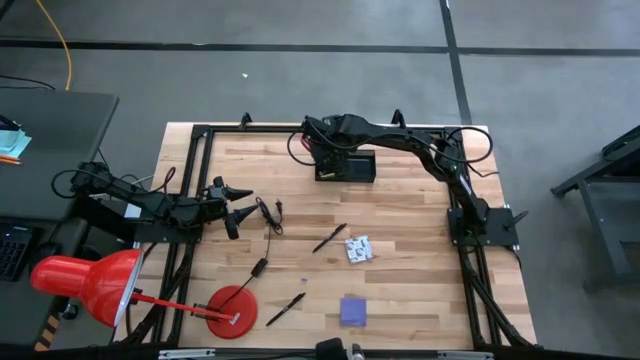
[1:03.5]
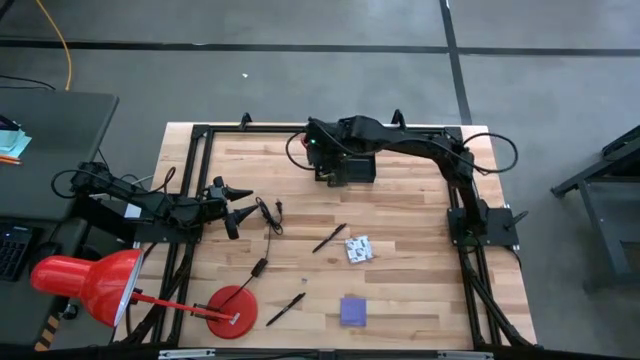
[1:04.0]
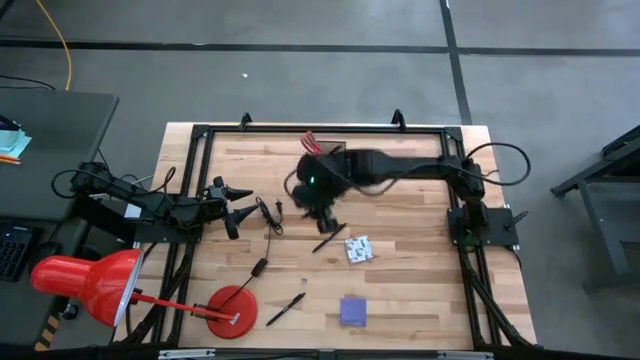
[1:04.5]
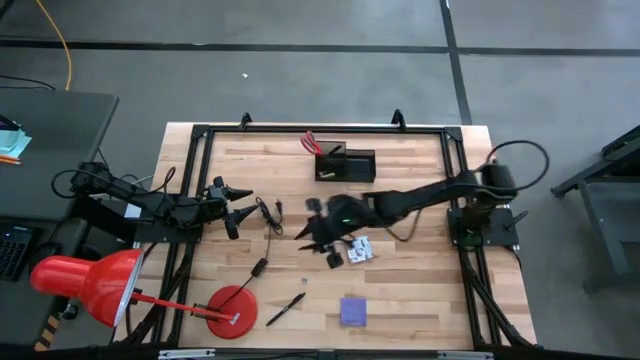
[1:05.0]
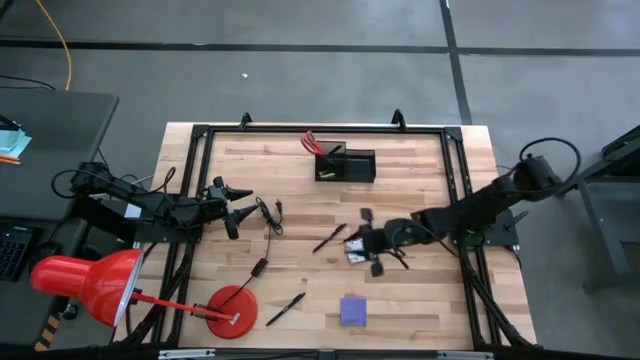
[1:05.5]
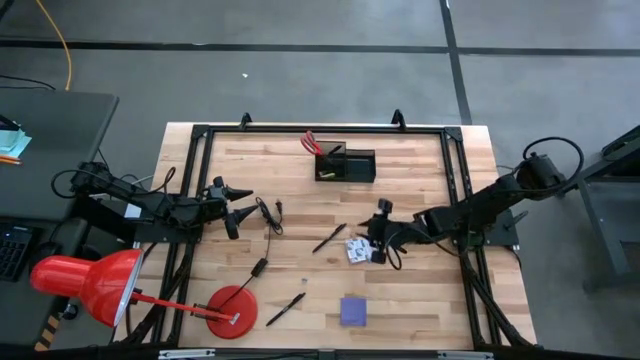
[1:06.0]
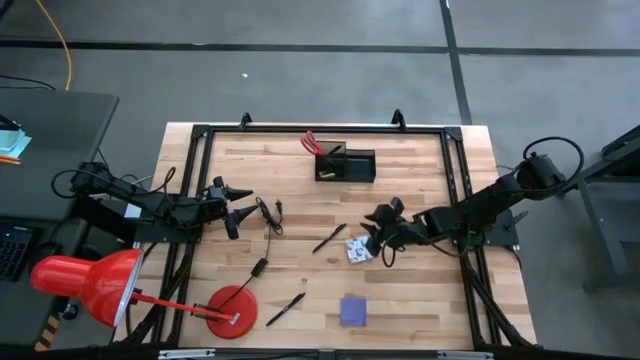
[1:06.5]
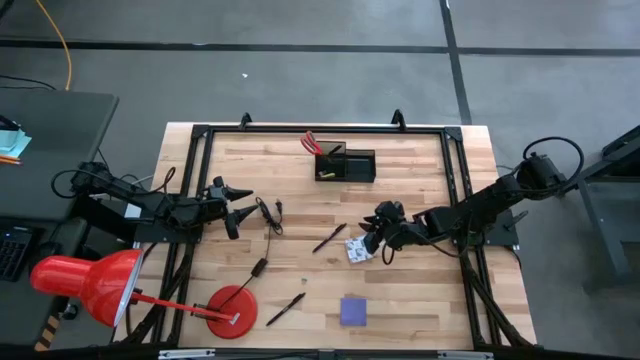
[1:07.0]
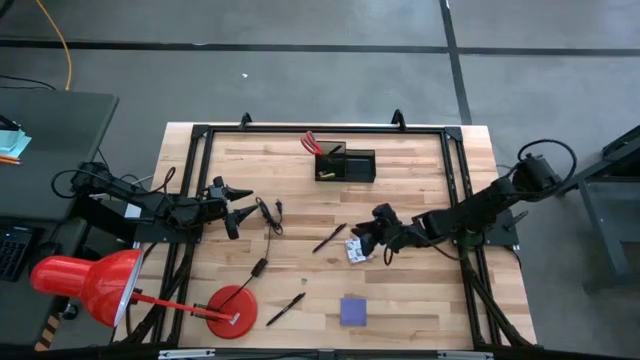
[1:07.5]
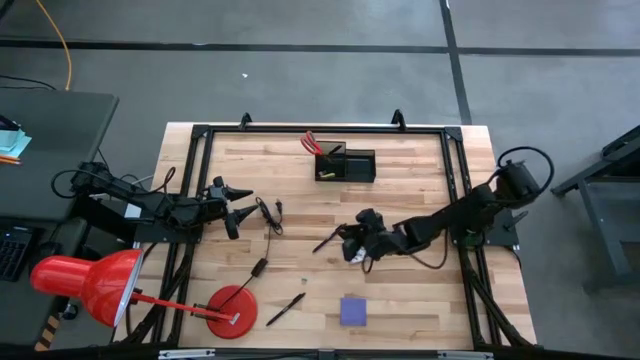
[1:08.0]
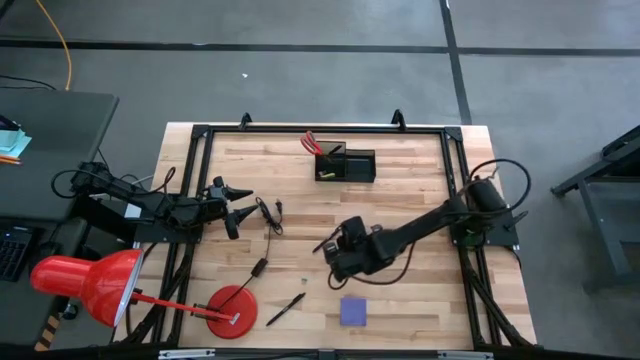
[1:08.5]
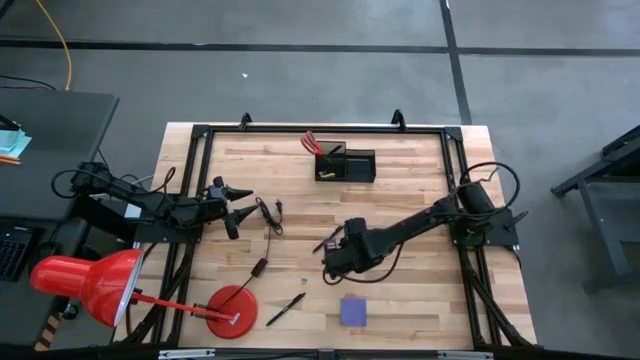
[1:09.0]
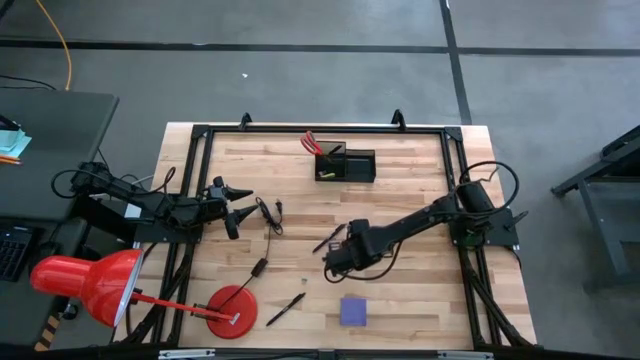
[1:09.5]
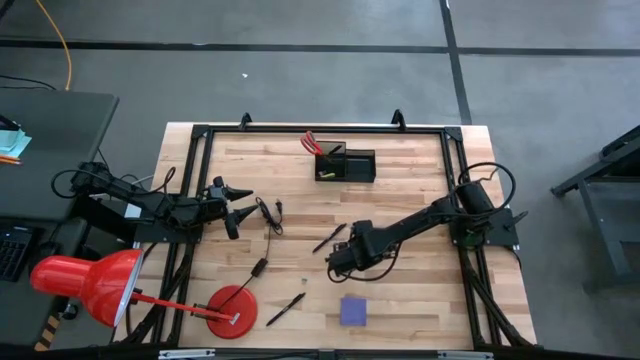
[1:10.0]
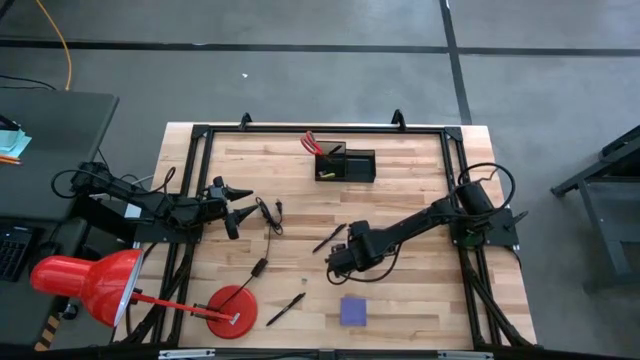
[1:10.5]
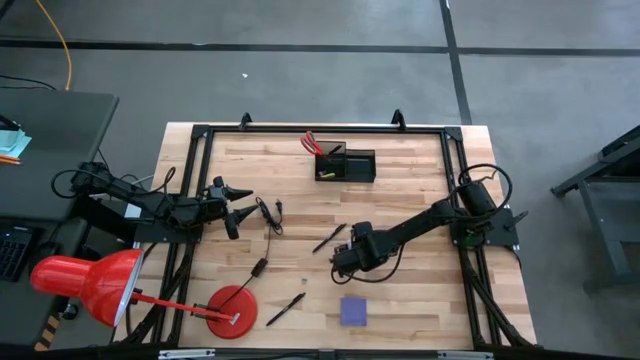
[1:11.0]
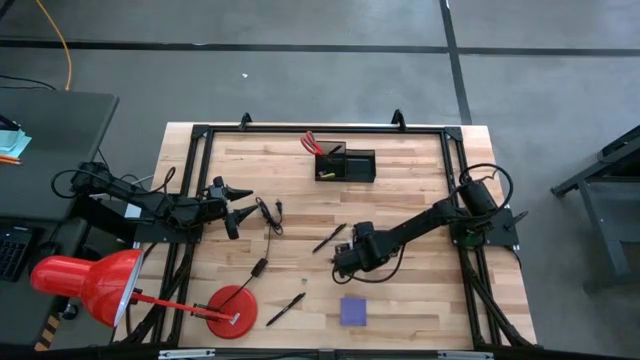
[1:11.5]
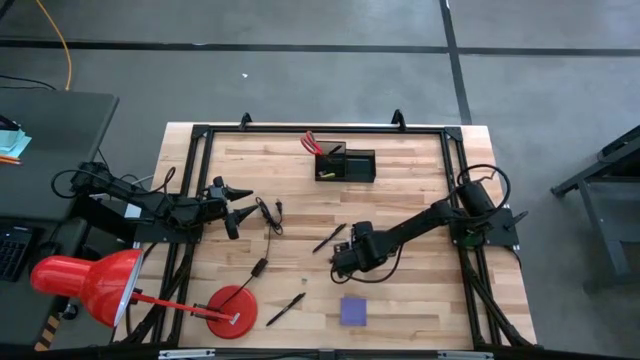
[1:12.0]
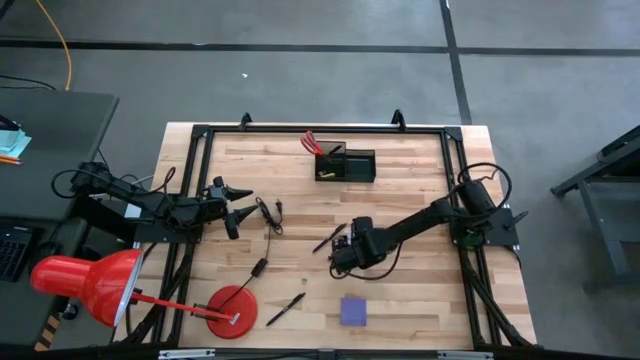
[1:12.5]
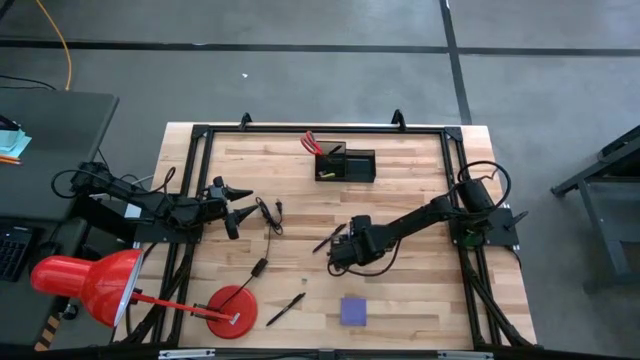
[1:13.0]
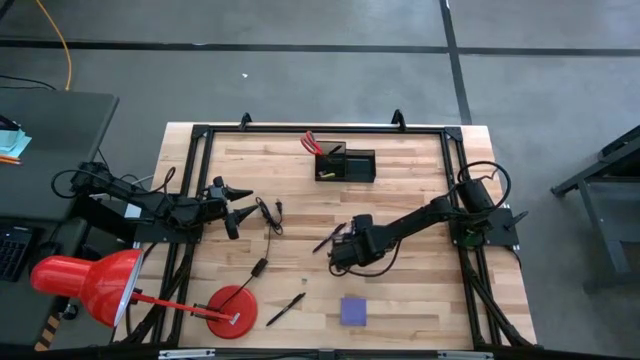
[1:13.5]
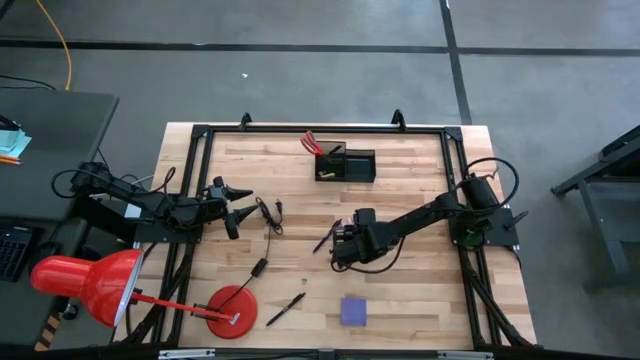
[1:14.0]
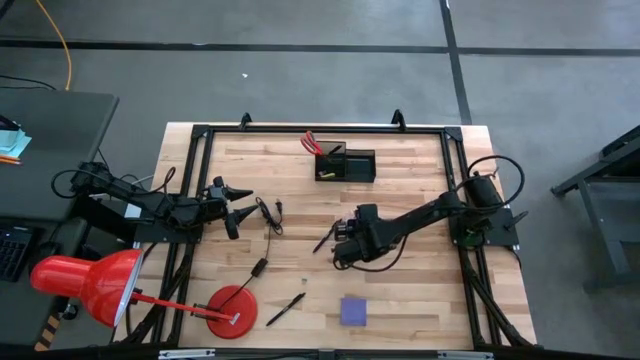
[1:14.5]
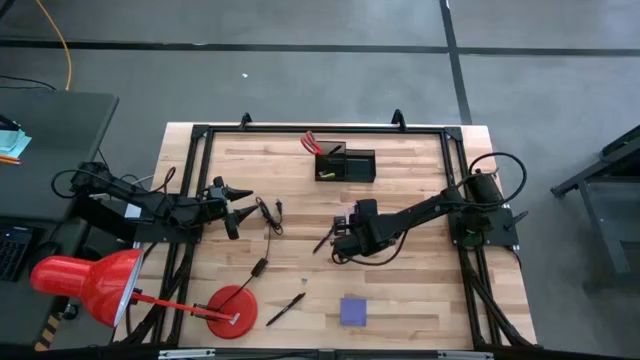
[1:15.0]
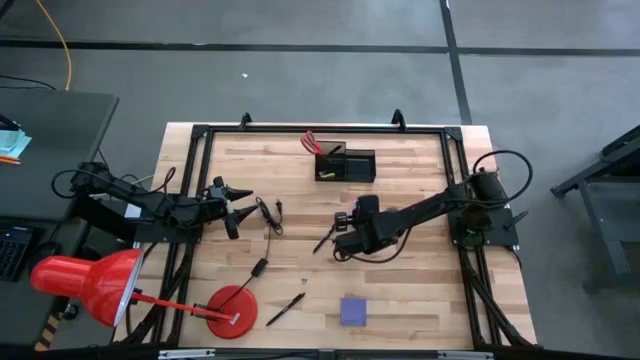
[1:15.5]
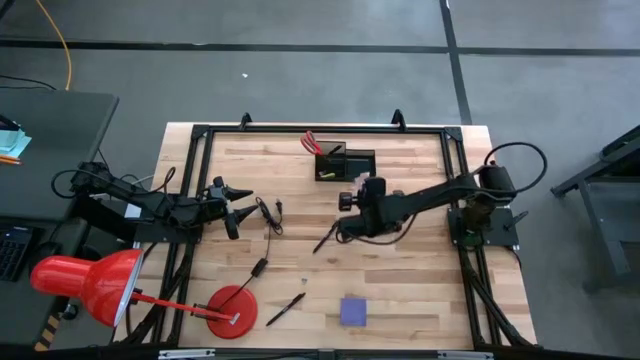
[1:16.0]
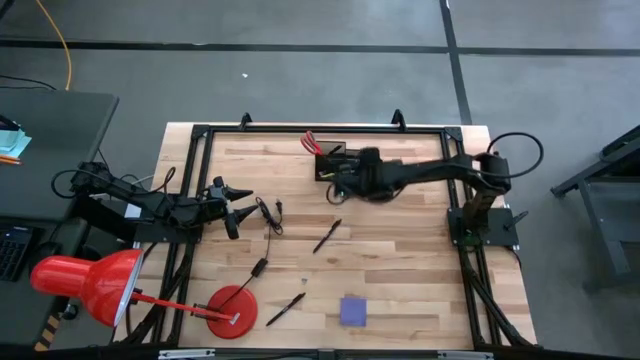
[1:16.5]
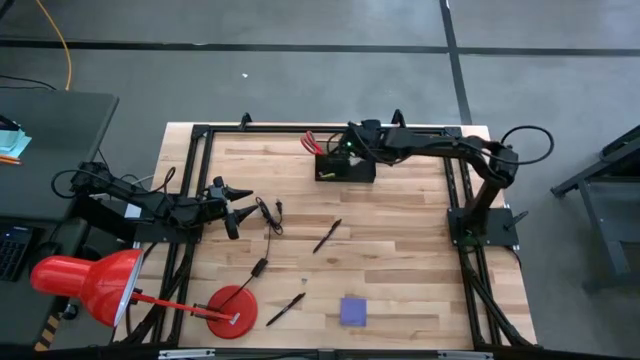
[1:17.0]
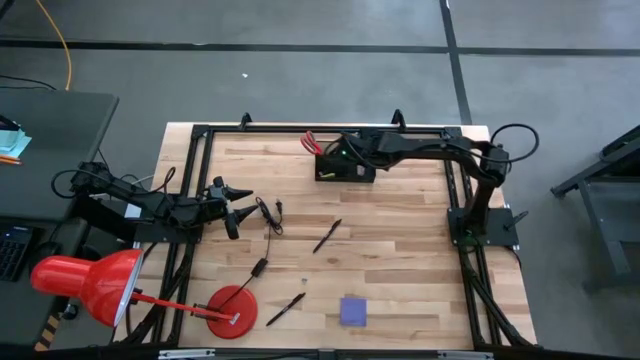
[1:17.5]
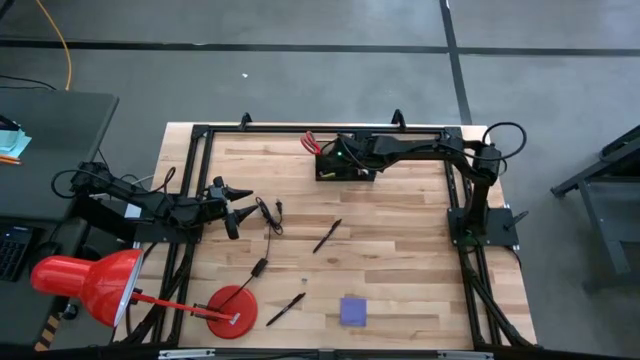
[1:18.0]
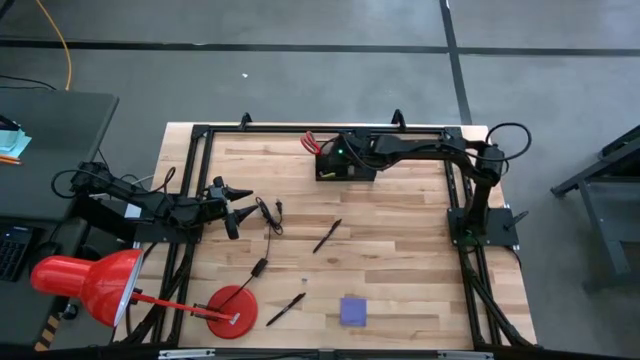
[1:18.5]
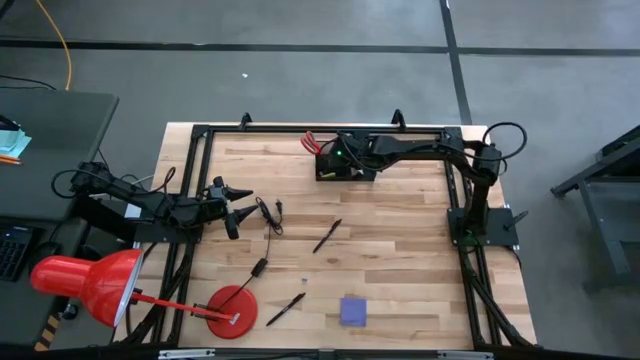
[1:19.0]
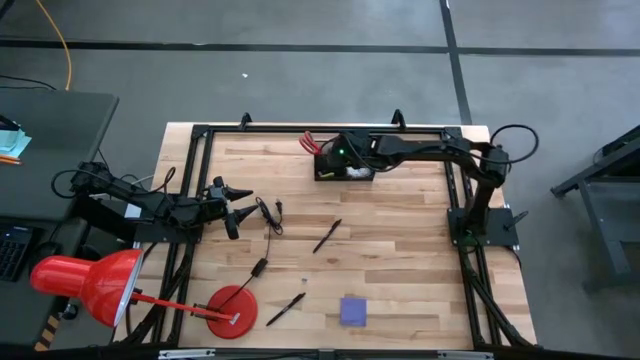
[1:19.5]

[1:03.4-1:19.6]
Task: Pick and place office supplies into organizer
Put the pink sticky note pad into the mesh desk organizer

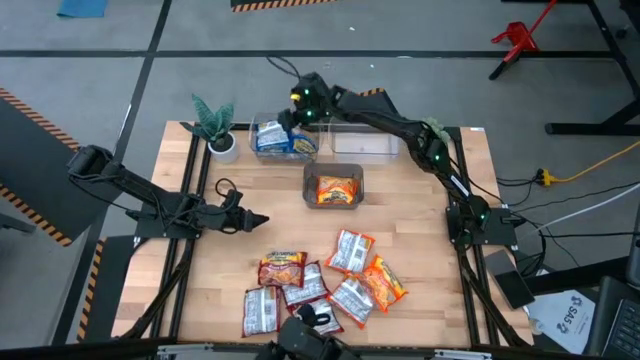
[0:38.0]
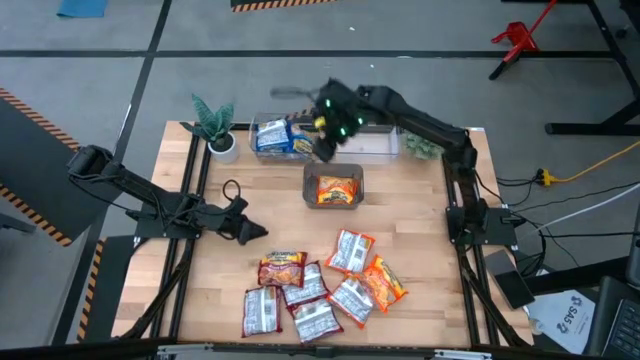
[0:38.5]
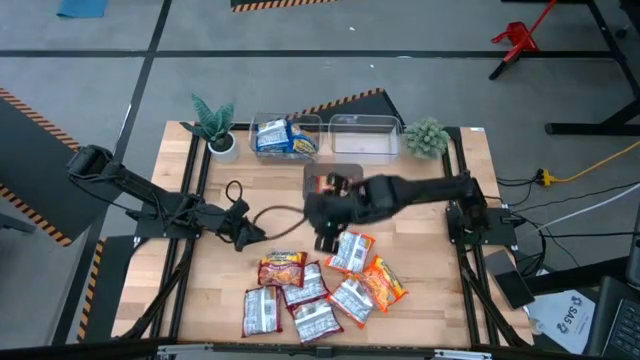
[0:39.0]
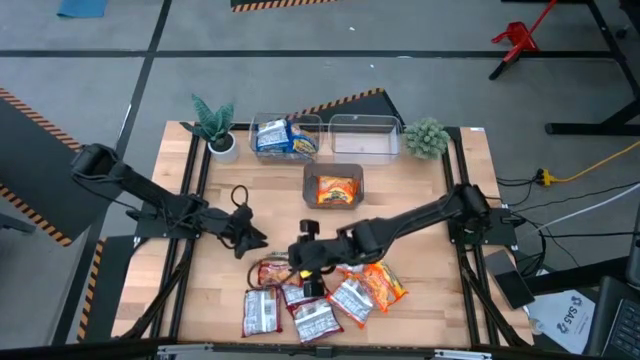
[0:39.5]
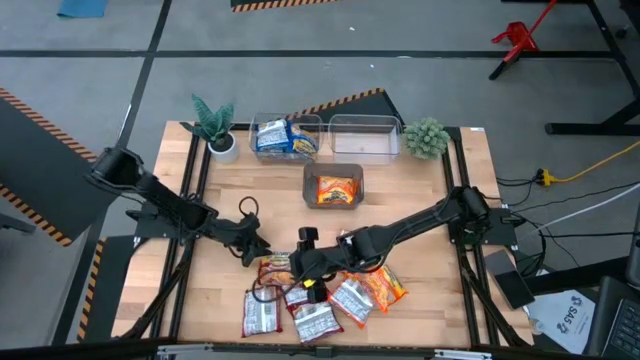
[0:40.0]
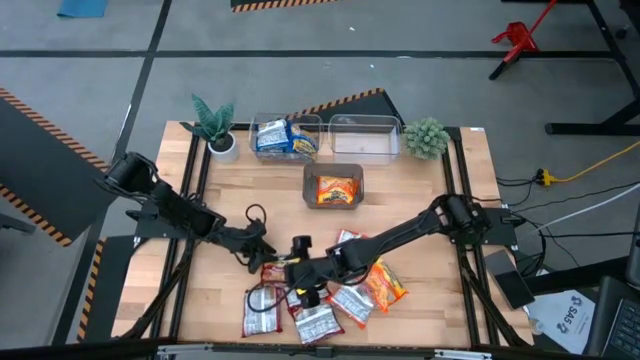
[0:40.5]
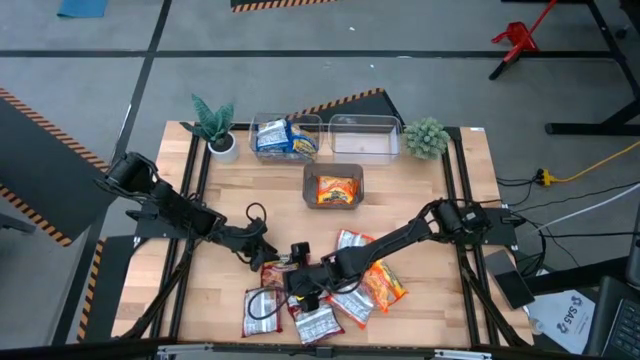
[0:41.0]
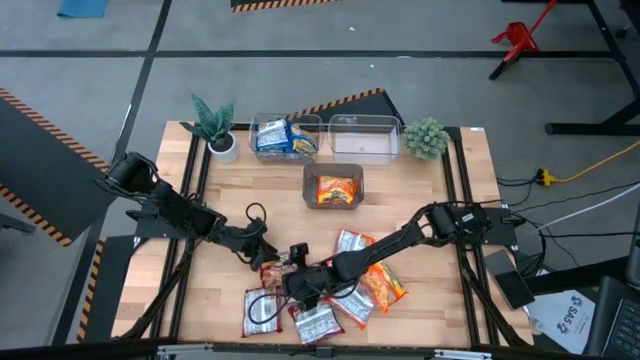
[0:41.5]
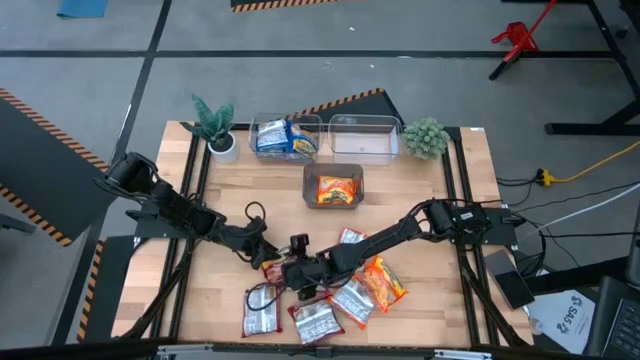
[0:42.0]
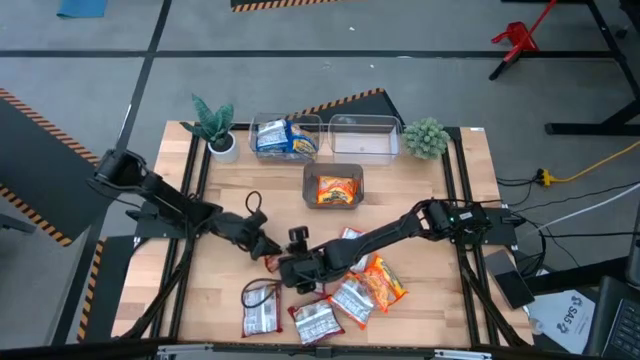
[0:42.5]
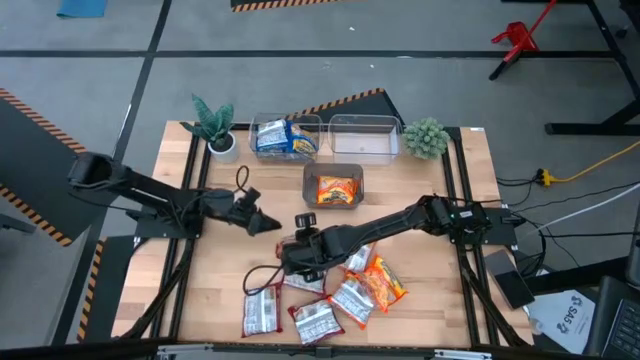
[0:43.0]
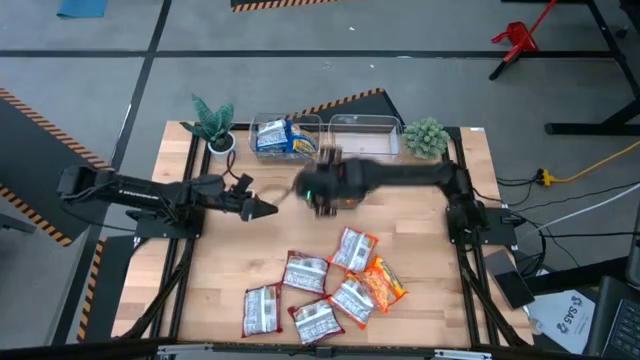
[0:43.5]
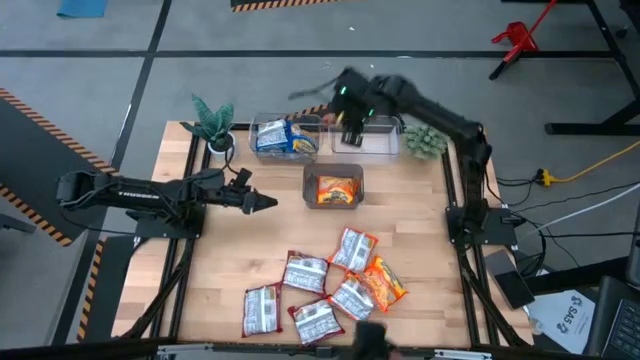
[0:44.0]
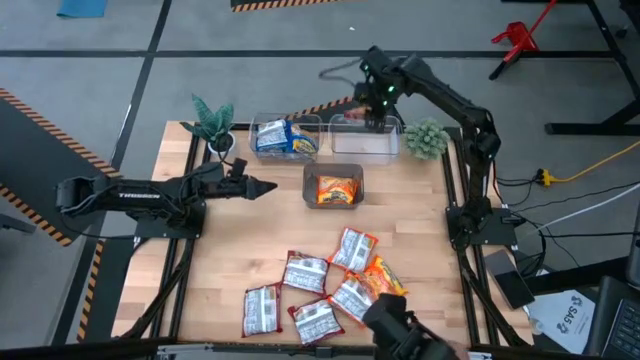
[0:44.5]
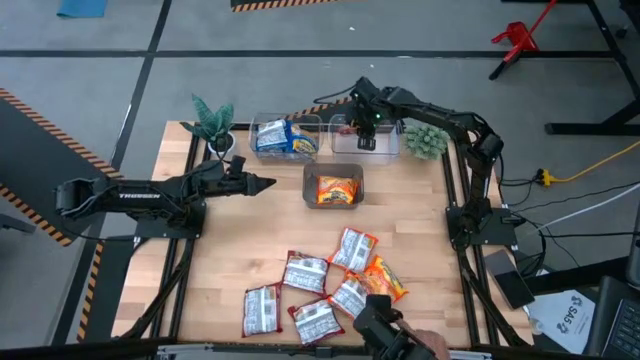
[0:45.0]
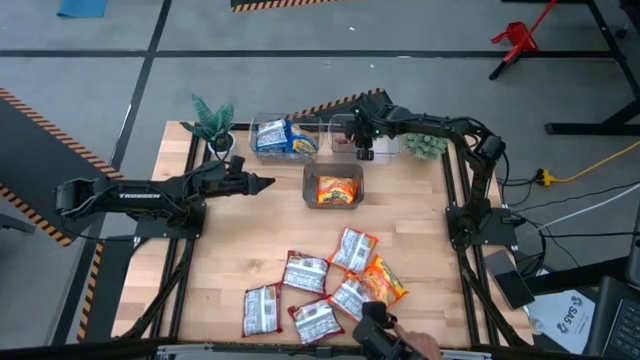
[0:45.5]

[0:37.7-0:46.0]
Task: Sort Maruchan noodles
Put the red noodle pack into the right transparent bin
